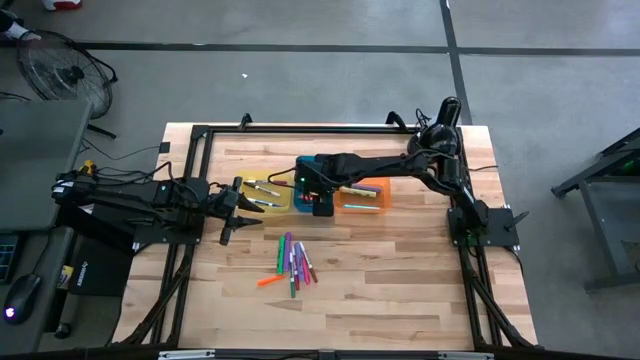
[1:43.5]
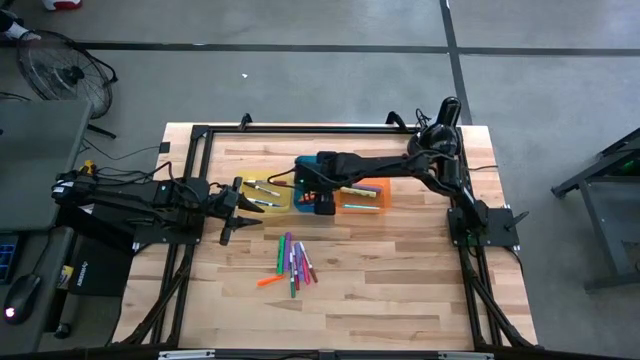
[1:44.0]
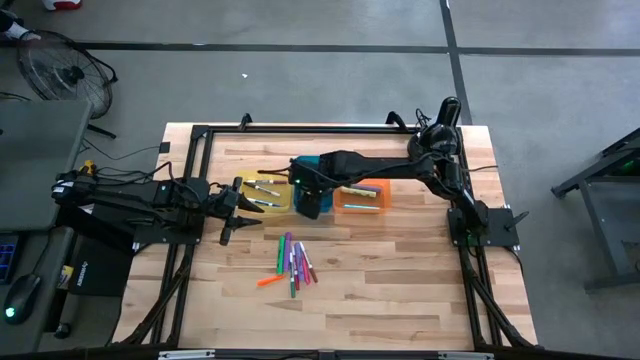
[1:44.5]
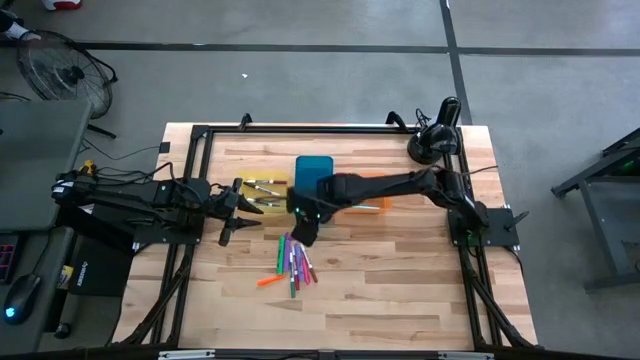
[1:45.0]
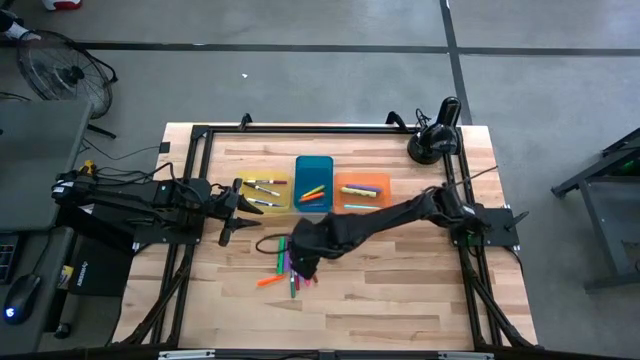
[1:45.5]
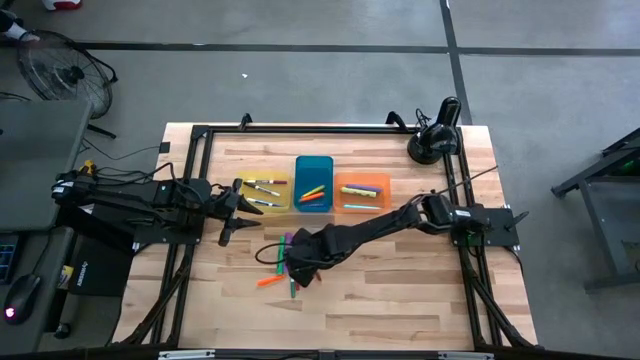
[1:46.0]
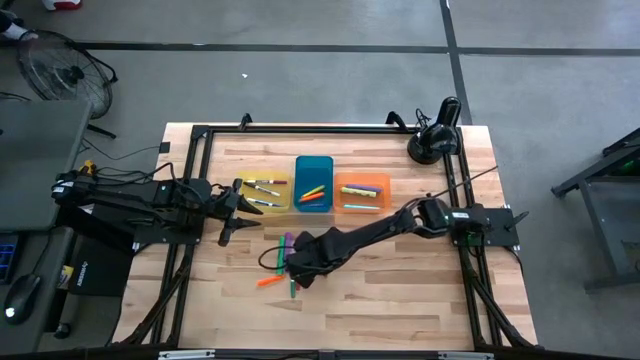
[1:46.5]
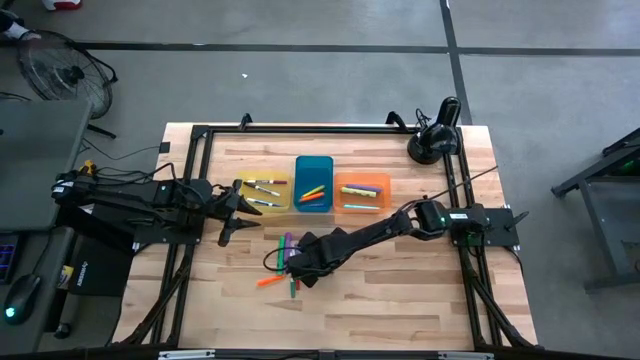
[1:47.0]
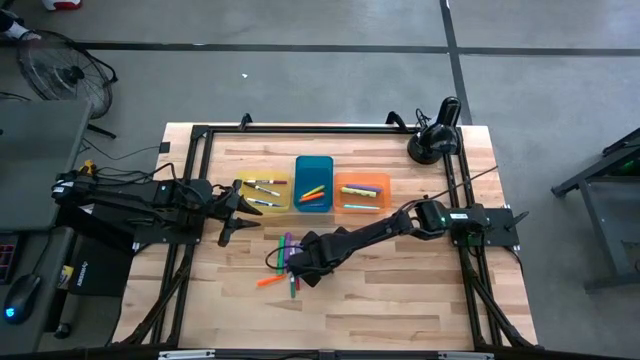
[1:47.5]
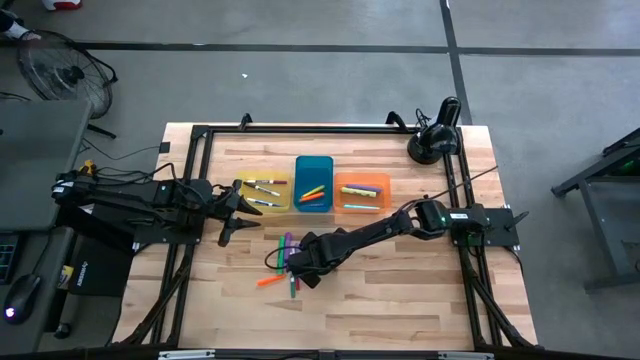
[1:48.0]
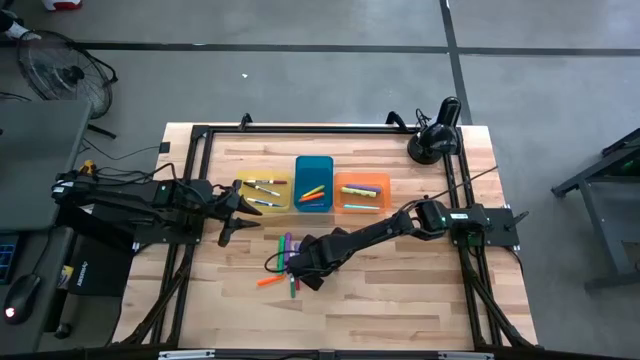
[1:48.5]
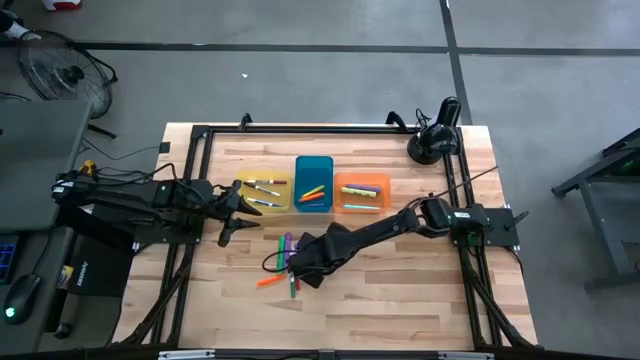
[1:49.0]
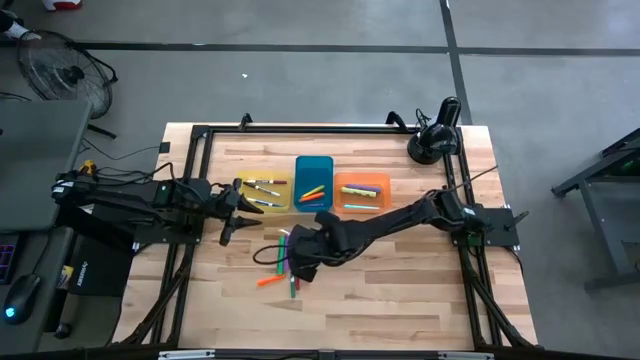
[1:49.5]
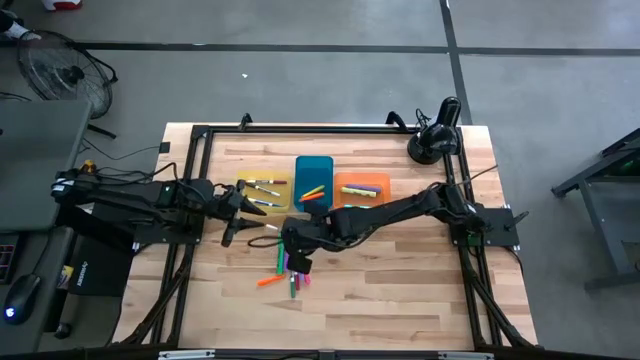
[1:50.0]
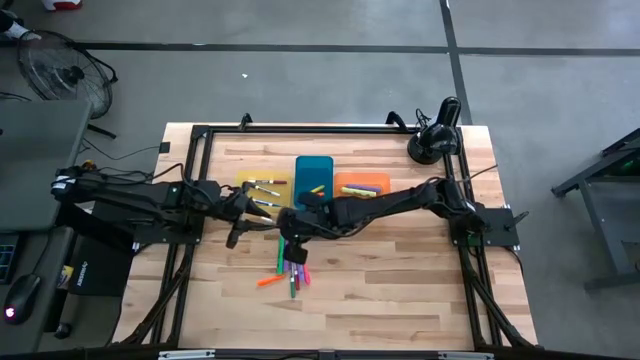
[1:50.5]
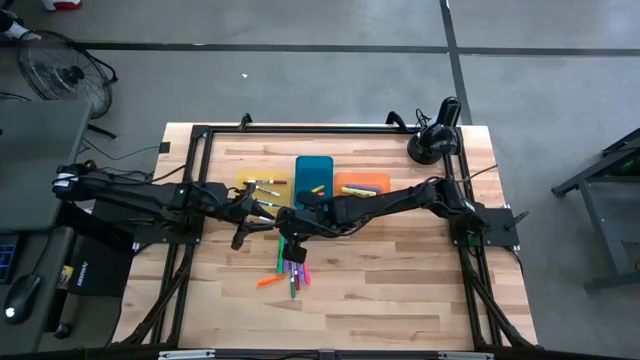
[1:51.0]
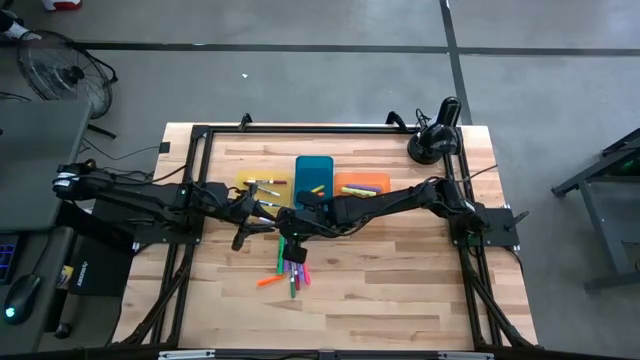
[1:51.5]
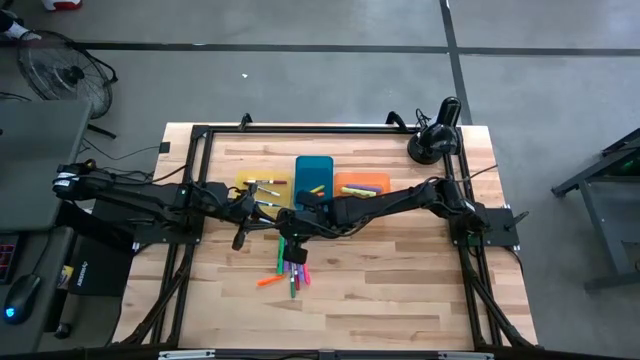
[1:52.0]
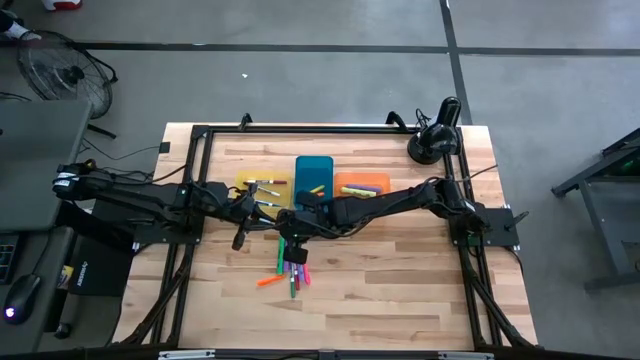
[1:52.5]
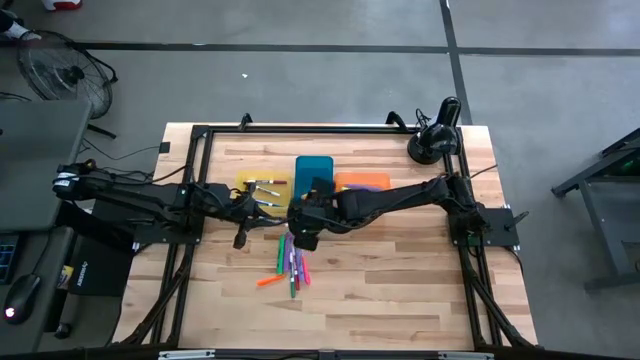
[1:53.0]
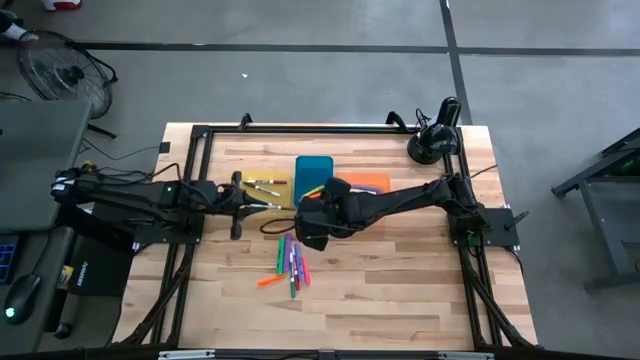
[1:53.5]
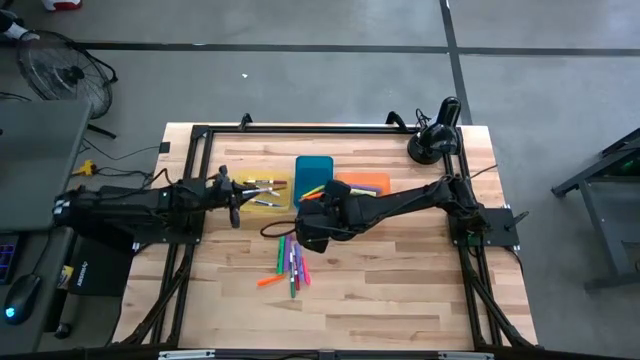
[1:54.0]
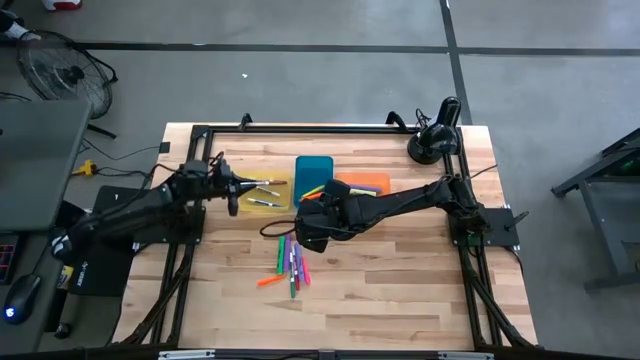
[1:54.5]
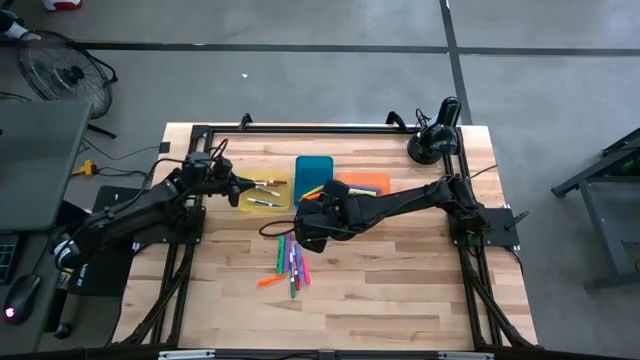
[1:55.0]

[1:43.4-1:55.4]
Task: Pick & Place Markers
Put the brown dry erase marker into the yellow bin

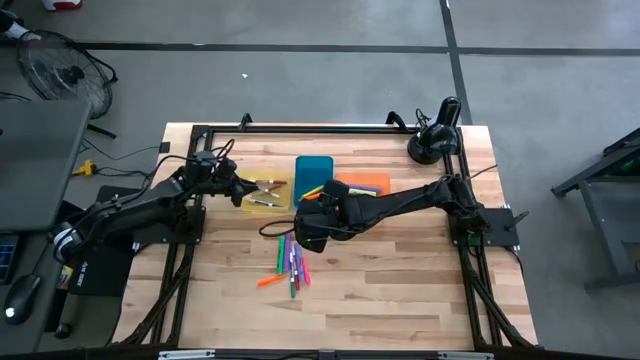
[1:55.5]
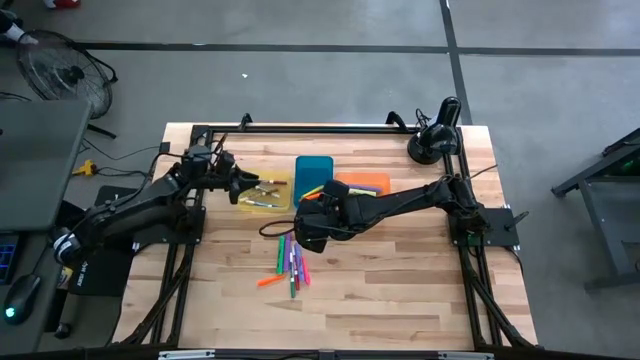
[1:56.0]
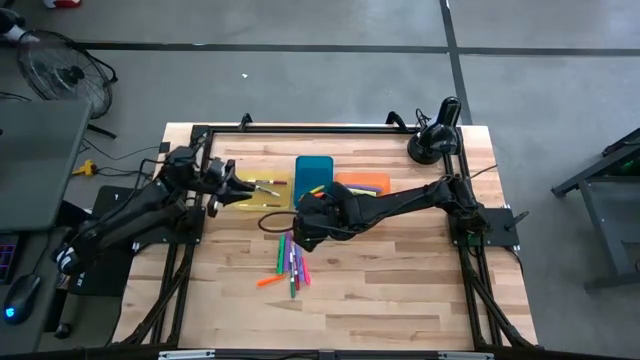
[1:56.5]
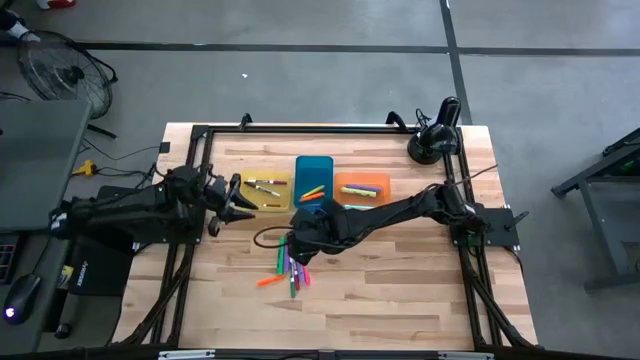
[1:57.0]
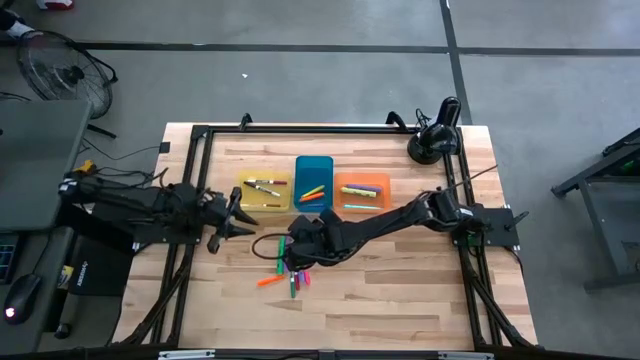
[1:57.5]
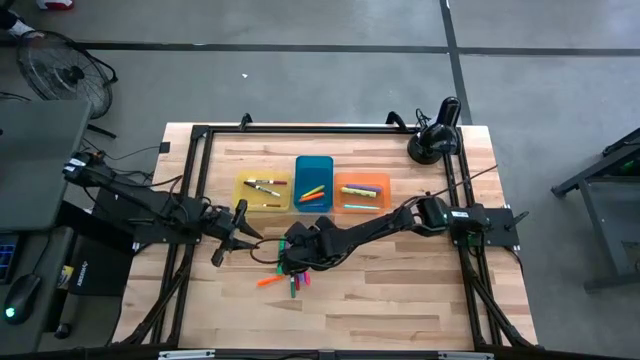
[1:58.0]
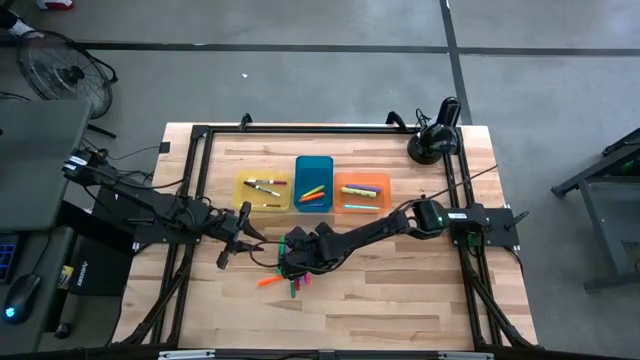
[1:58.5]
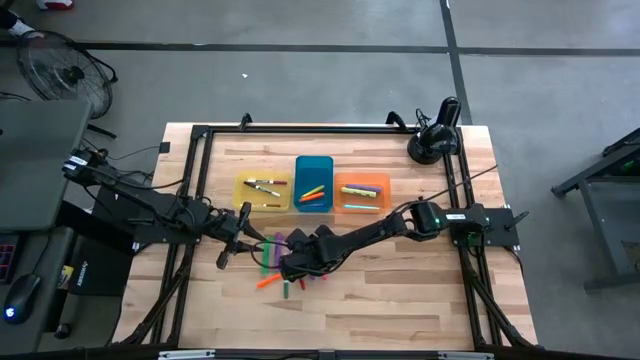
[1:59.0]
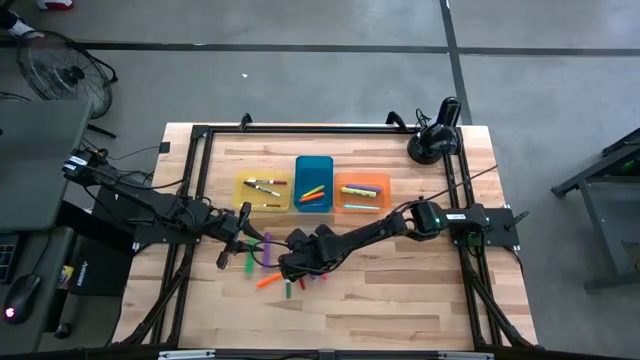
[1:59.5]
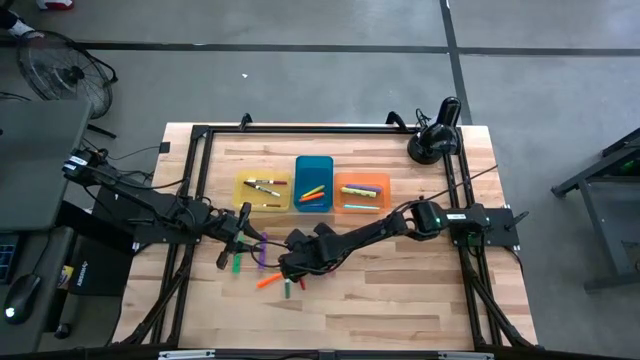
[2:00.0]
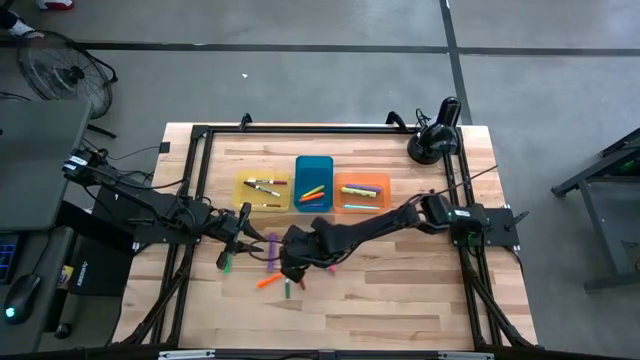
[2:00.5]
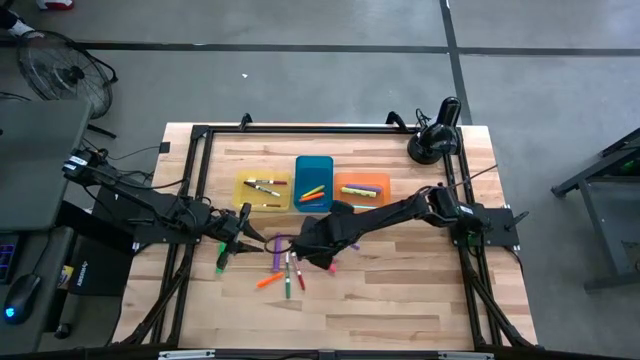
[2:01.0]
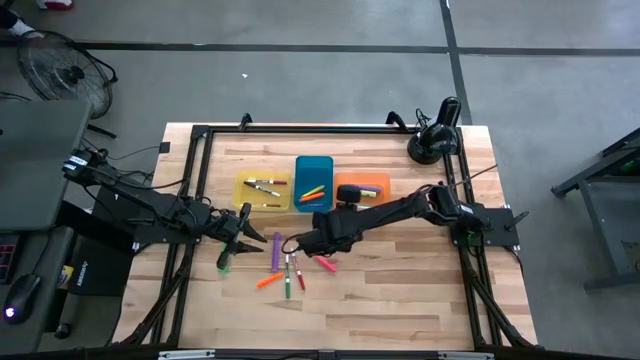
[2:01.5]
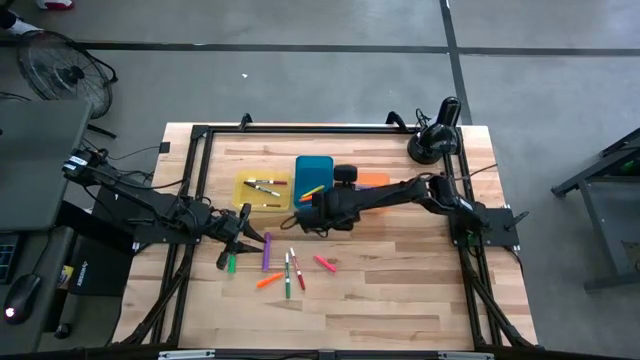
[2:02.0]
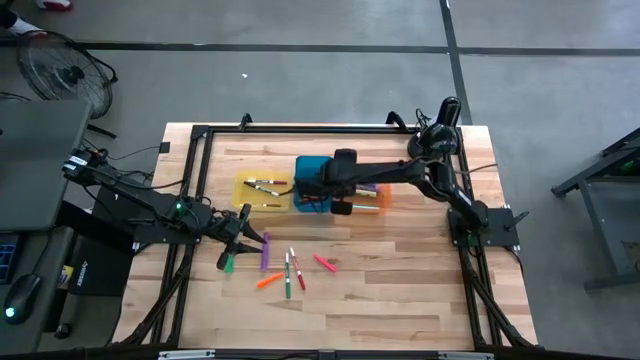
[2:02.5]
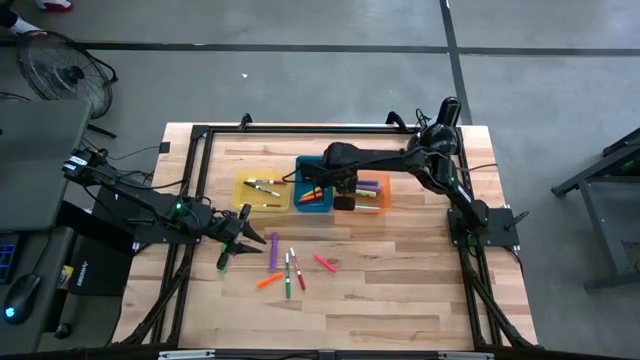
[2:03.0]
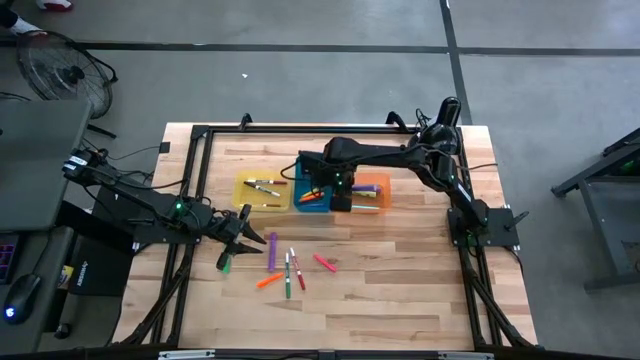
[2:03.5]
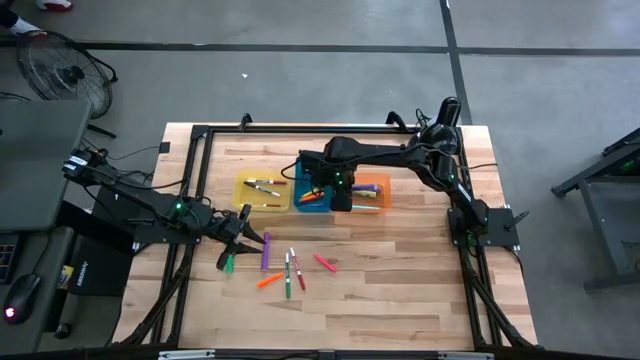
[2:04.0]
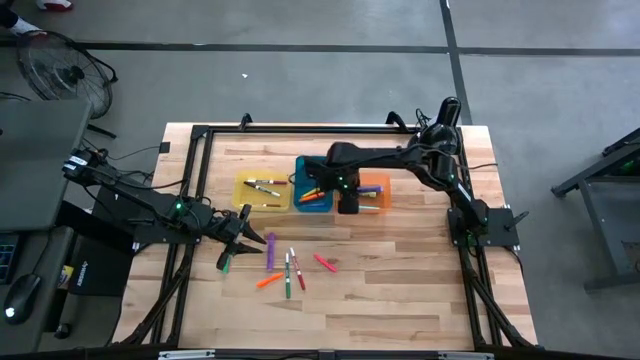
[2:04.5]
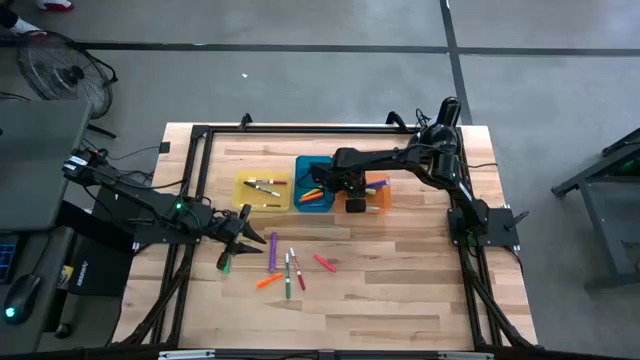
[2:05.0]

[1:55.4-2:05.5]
Put the light violet highlighter into the orange bin
